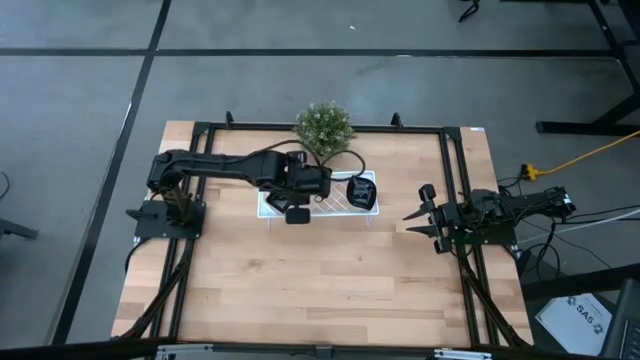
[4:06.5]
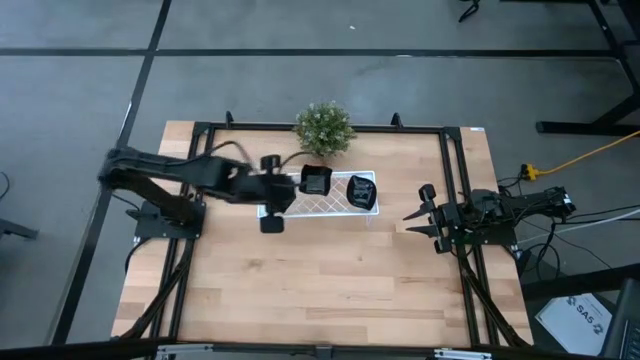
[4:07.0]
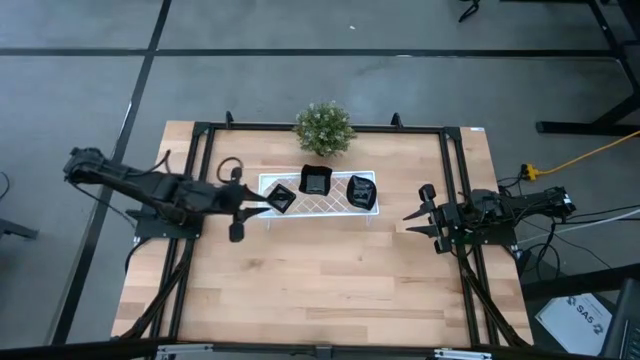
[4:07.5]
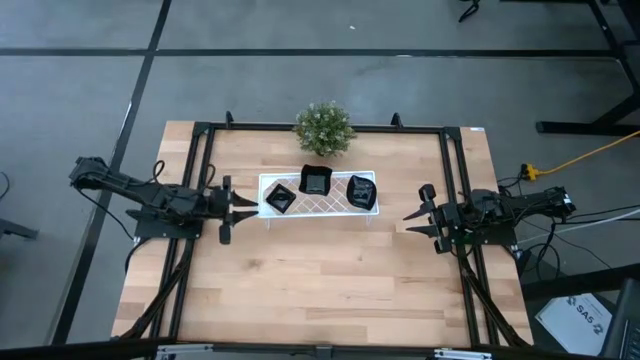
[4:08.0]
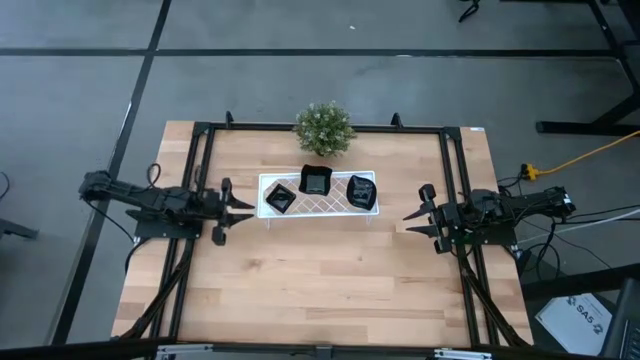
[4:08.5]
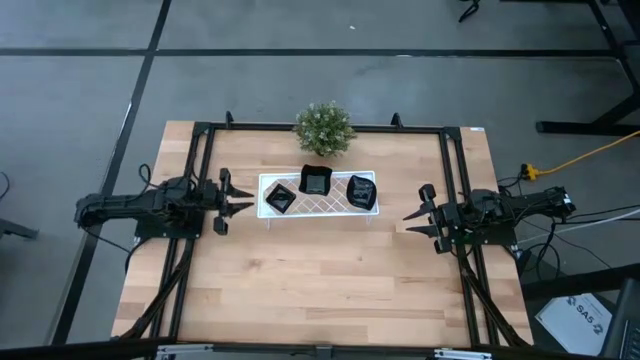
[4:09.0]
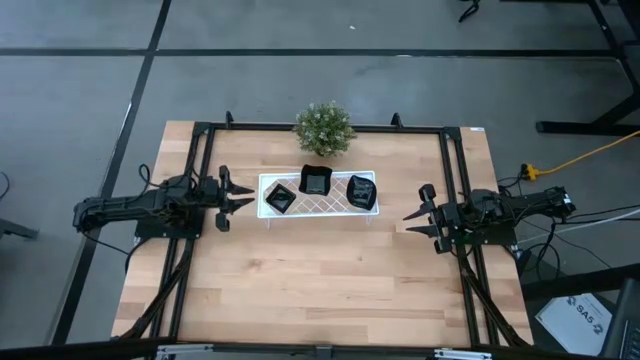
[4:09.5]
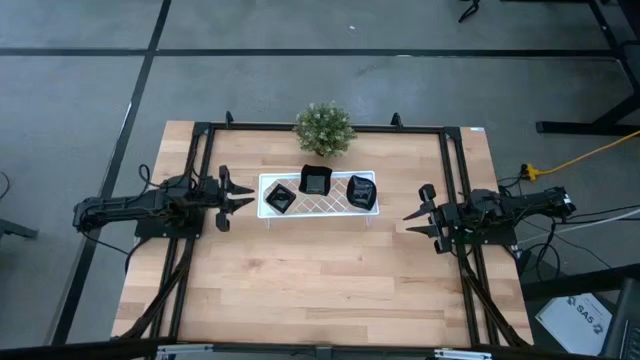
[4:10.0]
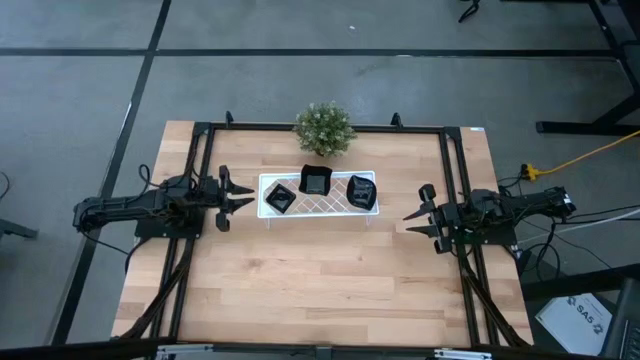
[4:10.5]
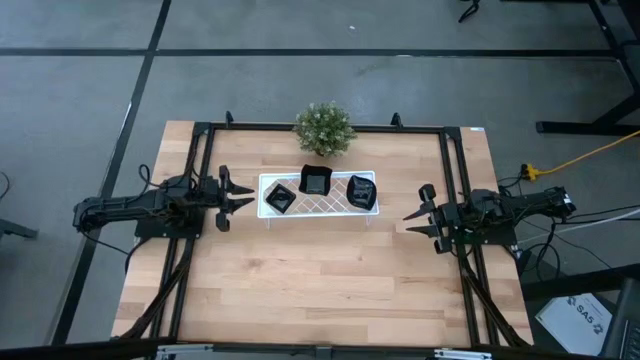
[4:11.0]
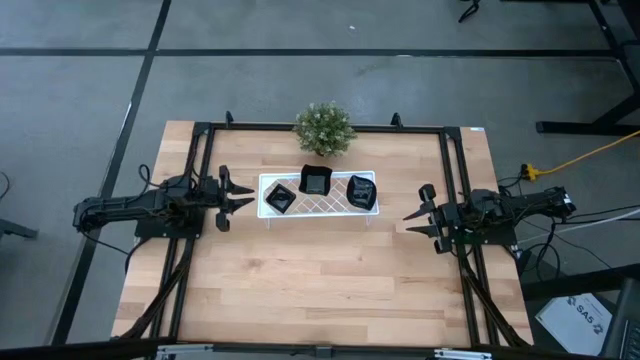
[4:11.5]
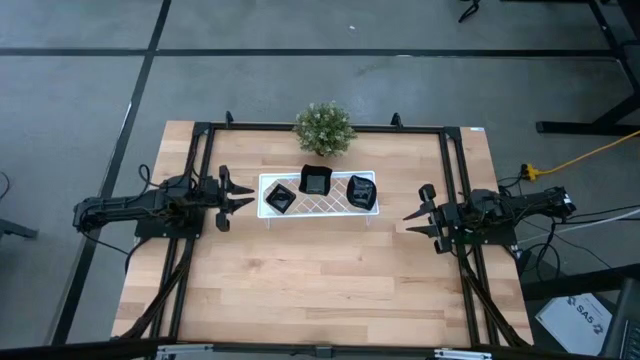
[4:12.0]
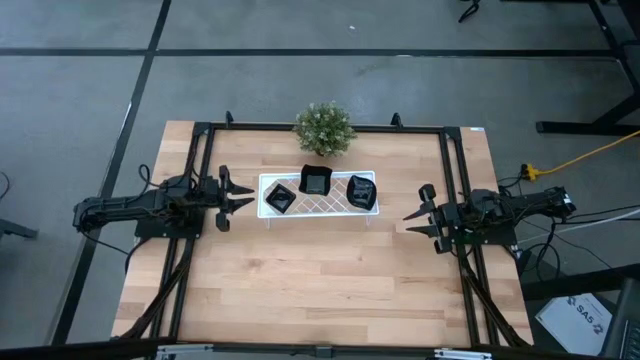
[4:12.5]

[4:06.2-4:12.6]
Task: Pick & Place Mini shaped plates
Return to Home Position

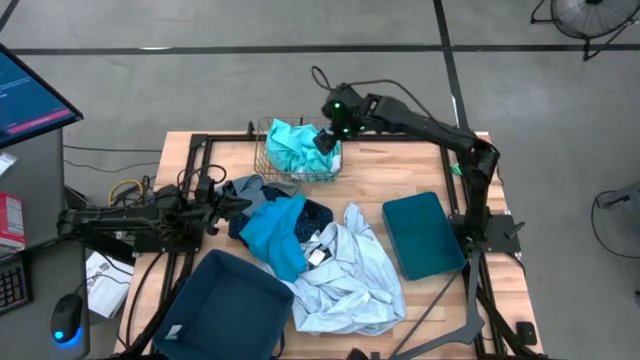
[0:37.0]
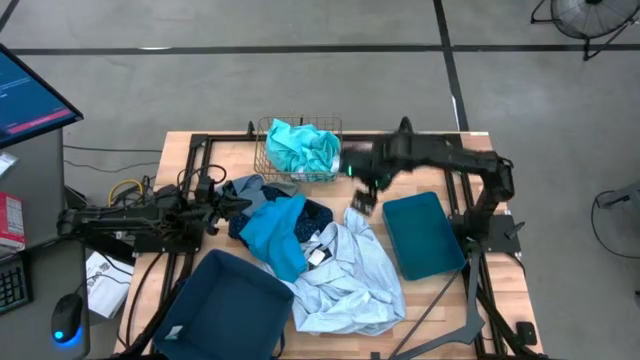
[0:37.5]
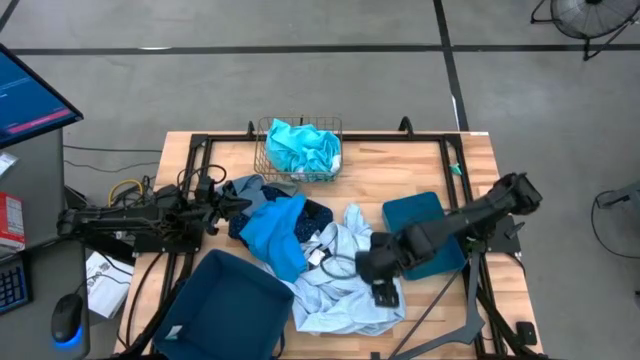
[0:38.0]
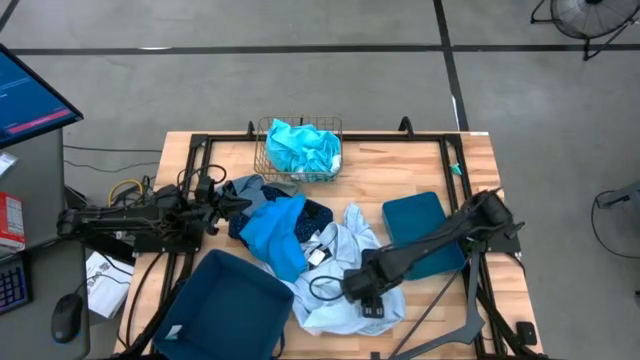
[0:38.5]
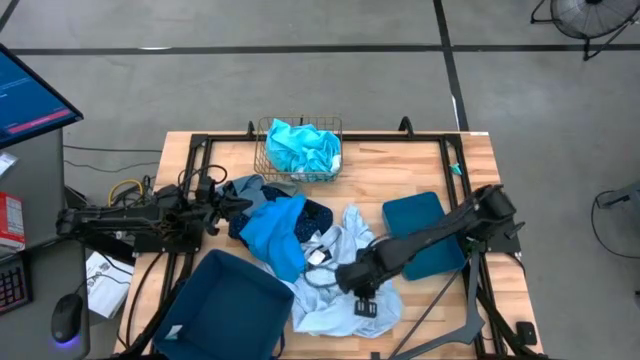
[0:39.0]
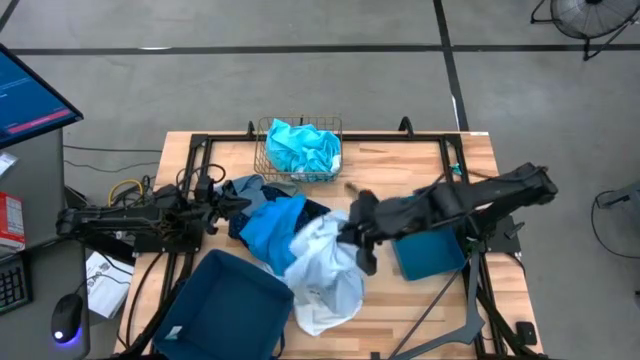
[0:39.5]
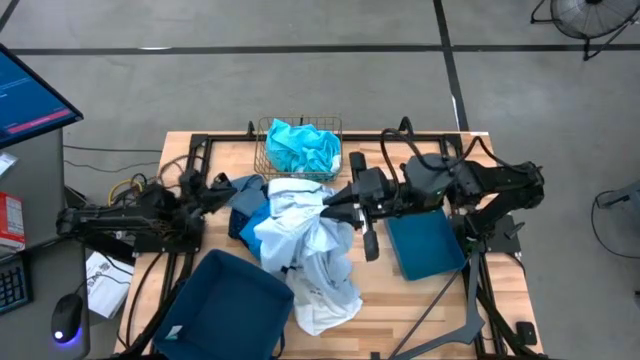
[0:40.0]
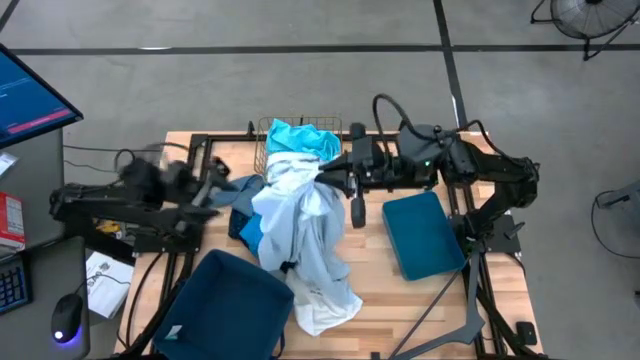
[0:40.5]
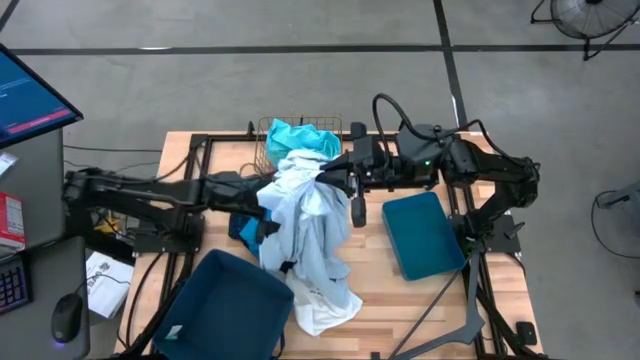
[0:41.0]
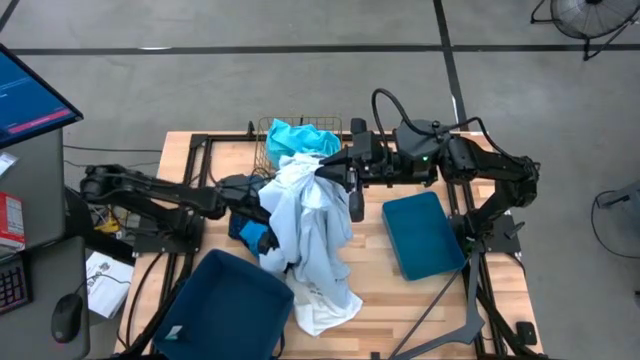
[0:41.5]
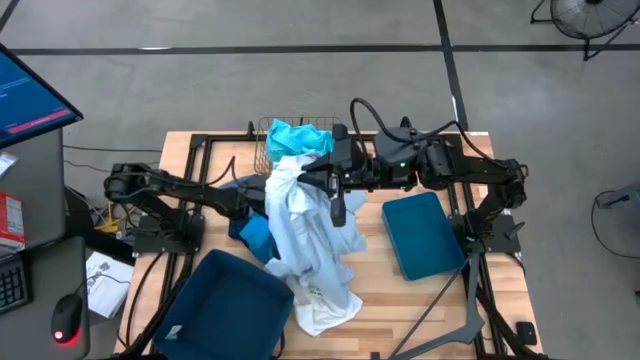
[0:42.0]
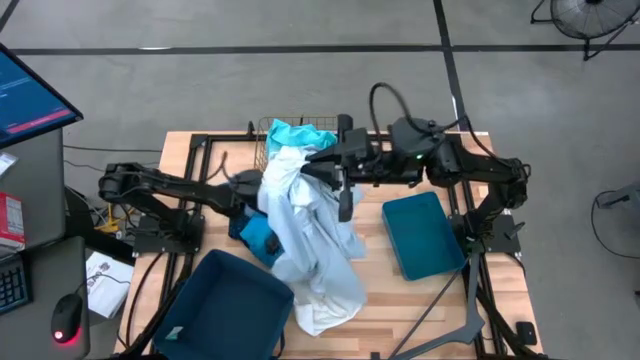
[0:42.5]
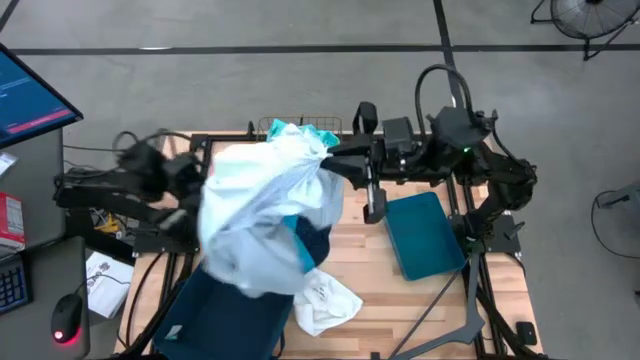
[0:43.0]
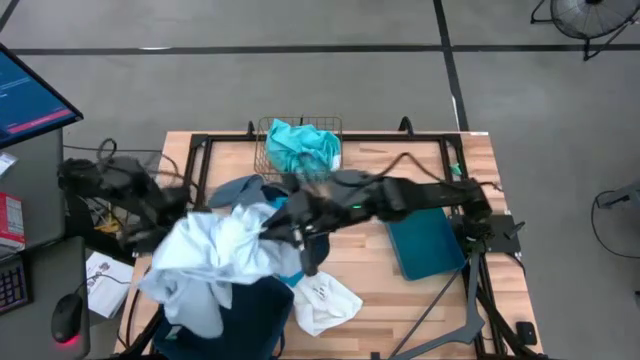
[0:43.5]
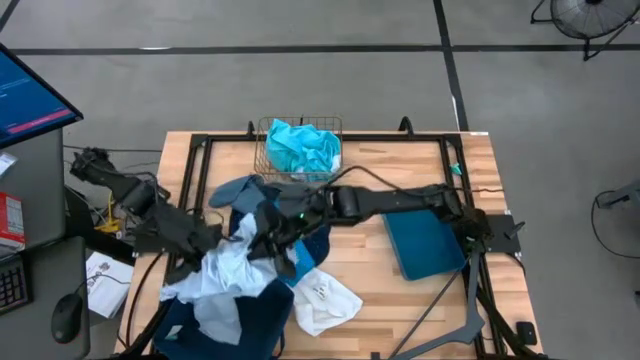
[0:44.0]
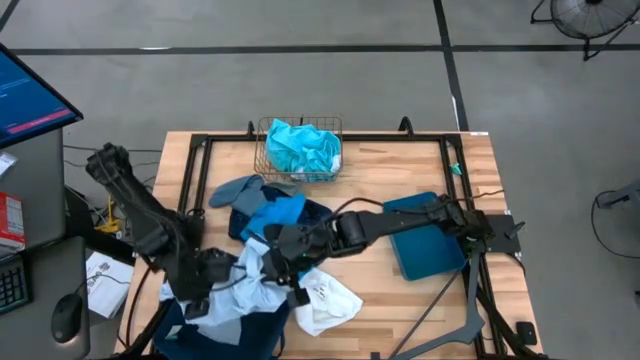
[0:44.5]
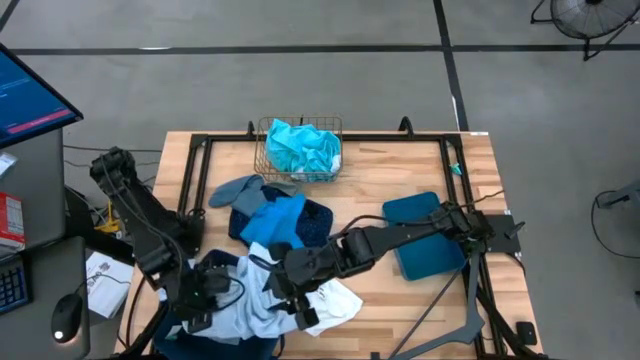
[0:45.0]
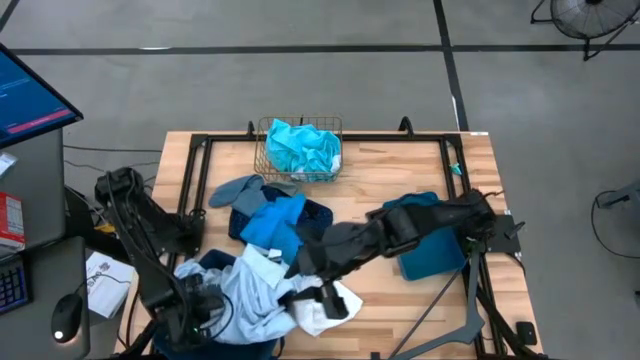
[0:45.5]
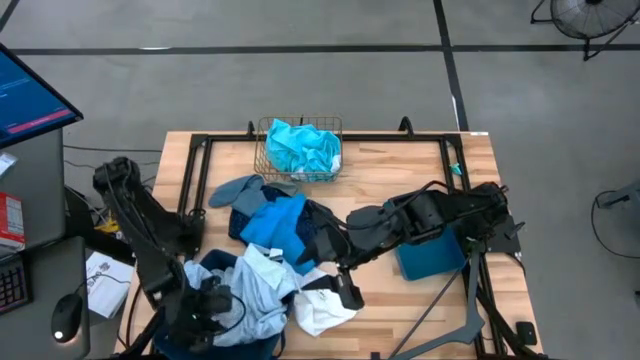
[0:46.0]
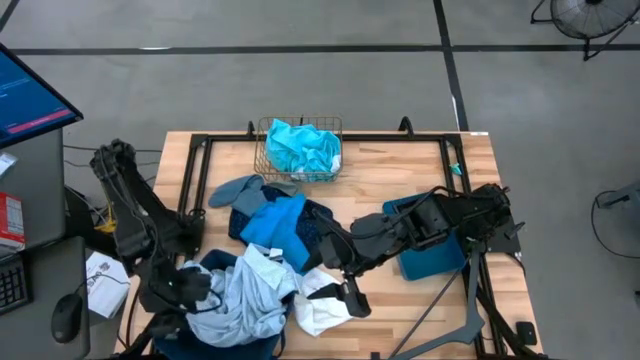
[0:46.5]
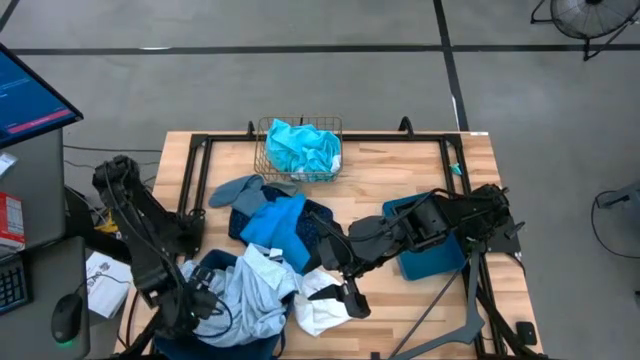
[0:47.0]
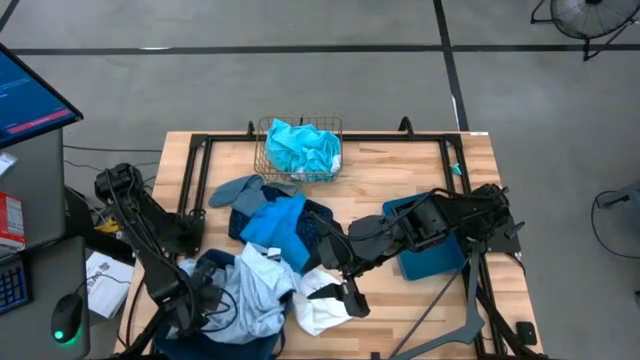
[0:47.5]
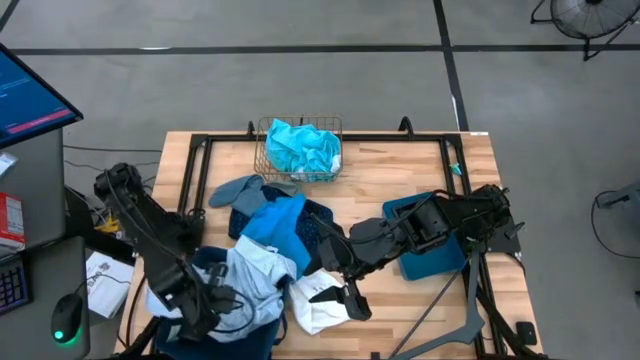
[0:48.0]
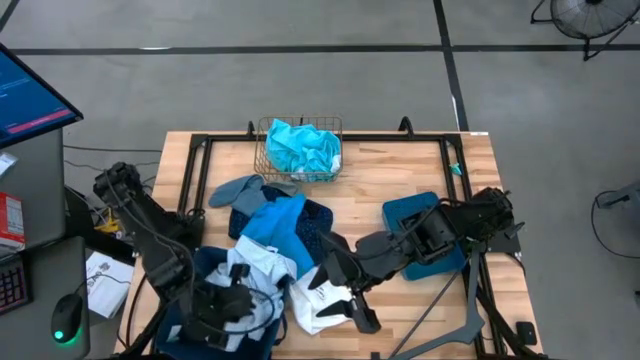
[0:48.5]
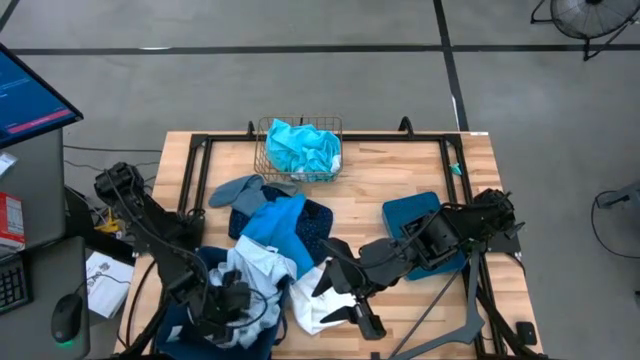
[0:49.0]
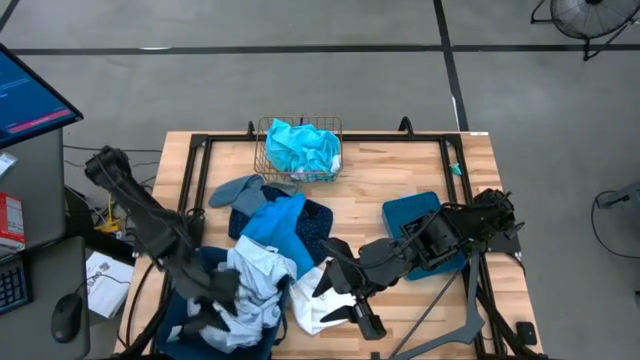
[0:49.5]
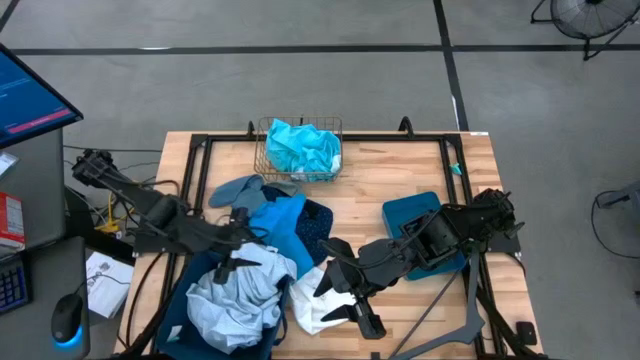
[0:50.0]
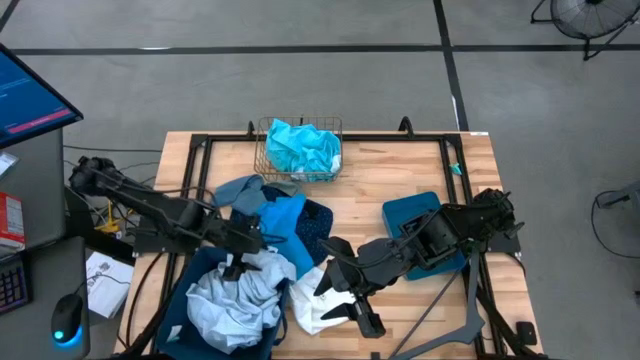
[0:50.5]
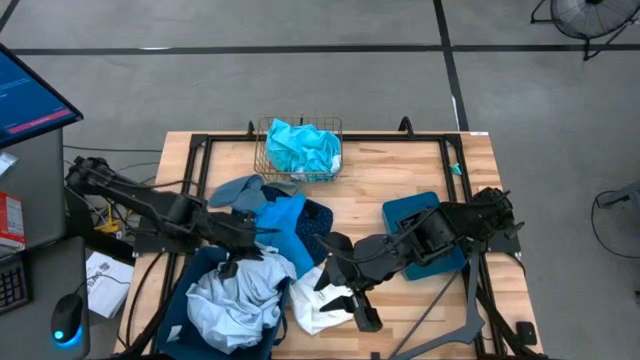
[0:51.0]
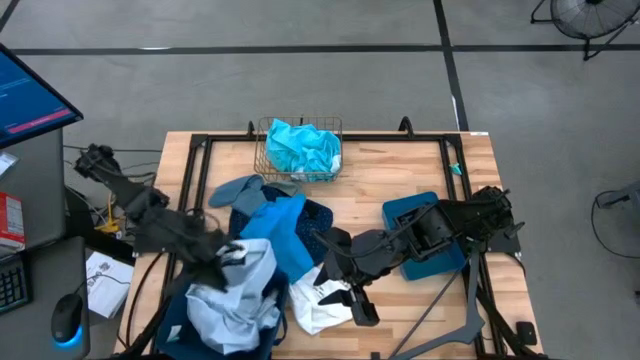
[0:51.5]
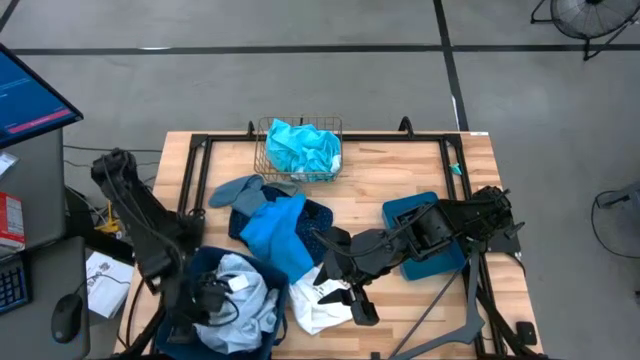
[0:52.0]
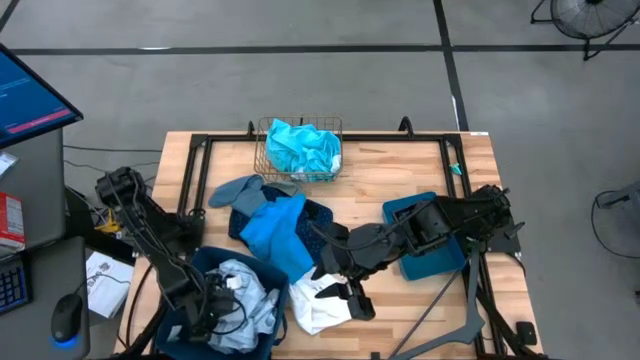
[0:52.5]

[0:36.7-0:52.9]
Task: Pick & Place Cloths
Put the white patterned shirt into the dark blue laundry organizer
